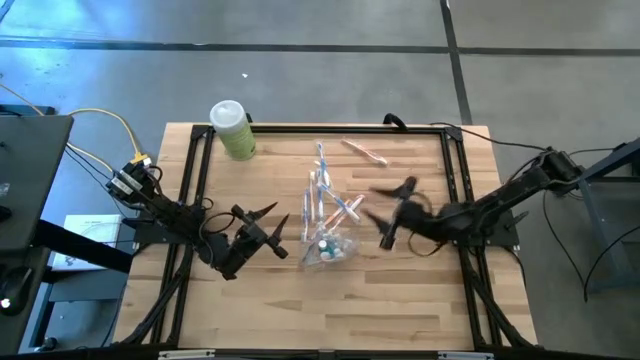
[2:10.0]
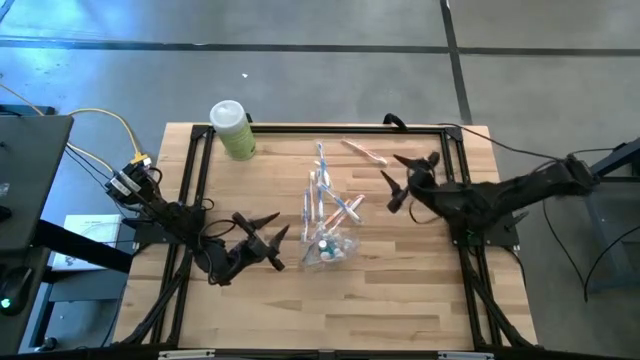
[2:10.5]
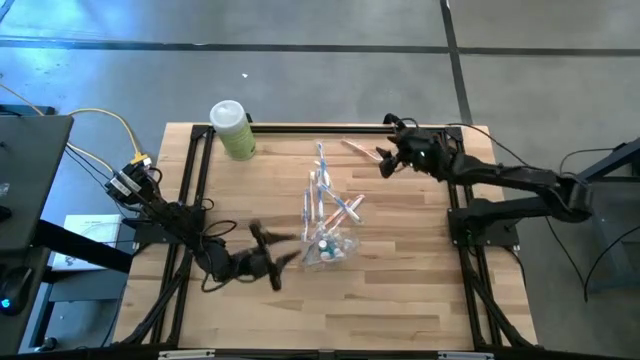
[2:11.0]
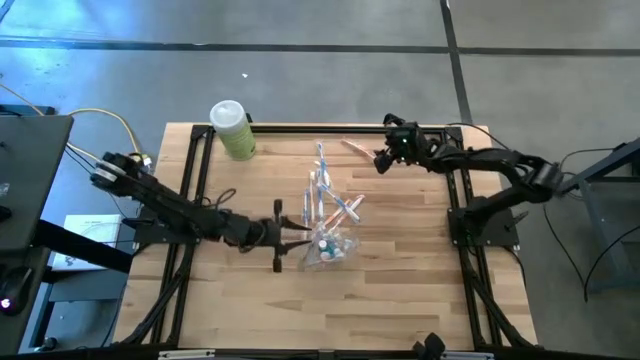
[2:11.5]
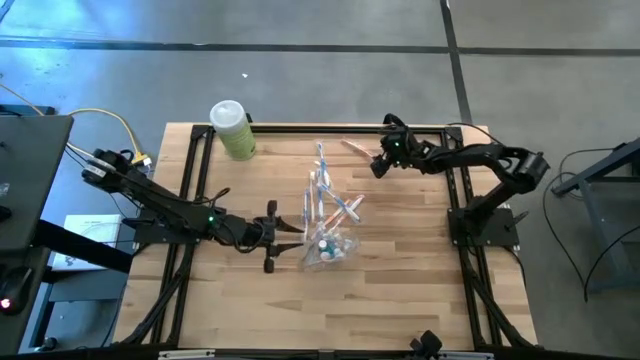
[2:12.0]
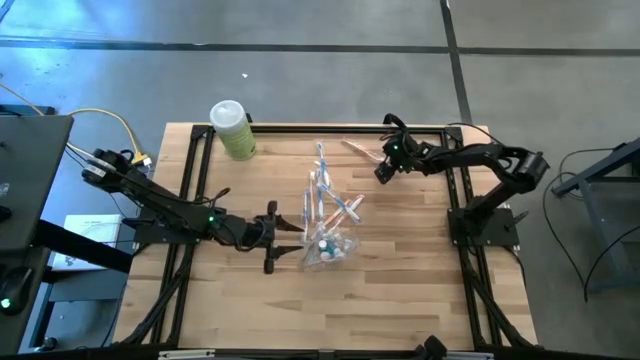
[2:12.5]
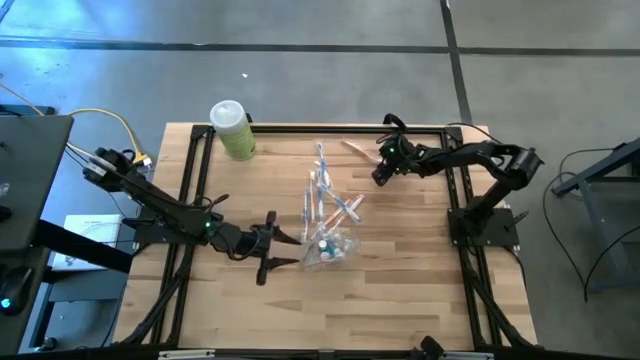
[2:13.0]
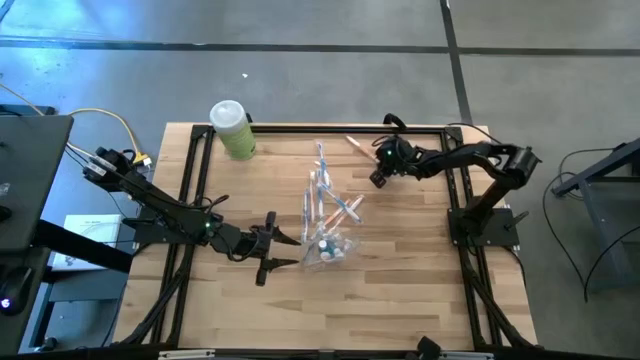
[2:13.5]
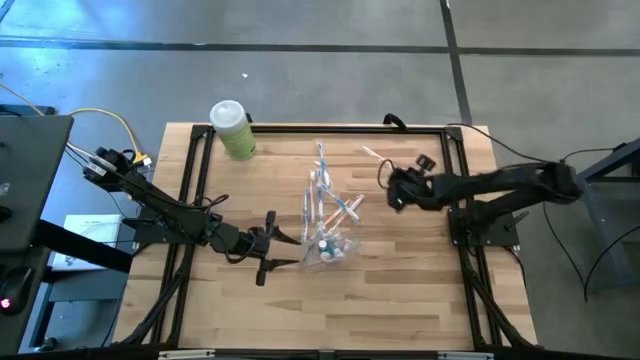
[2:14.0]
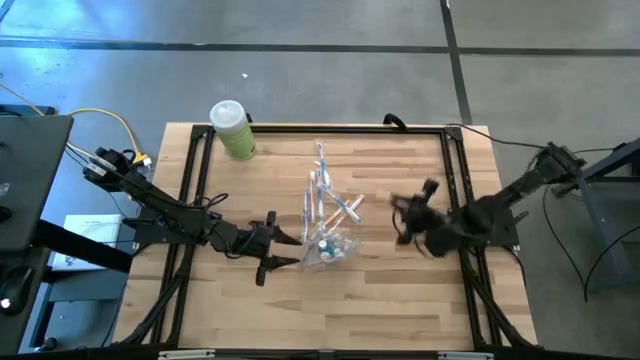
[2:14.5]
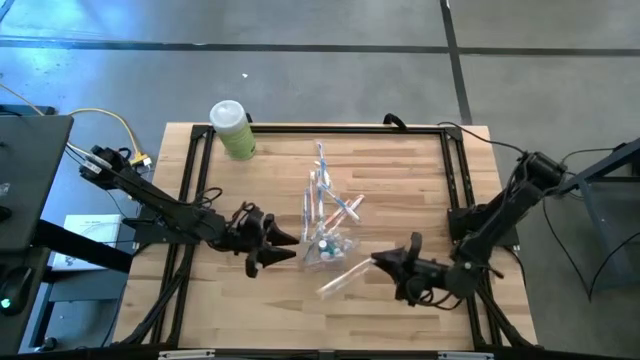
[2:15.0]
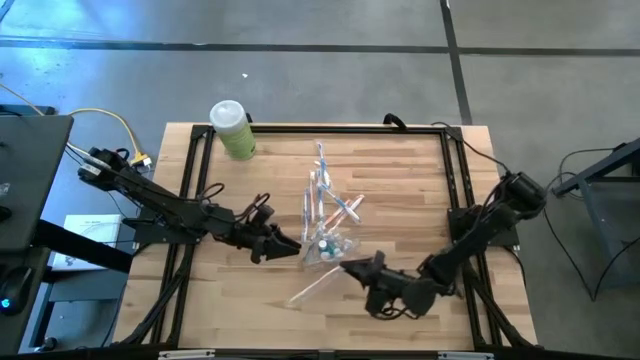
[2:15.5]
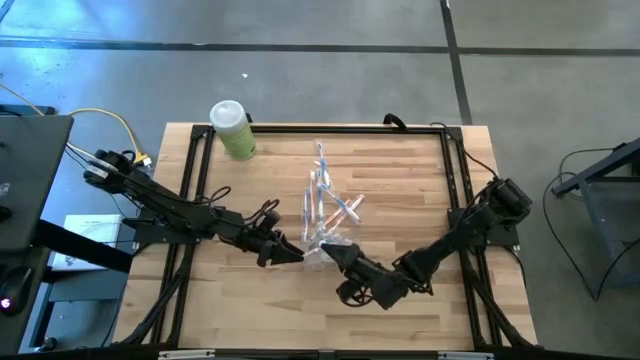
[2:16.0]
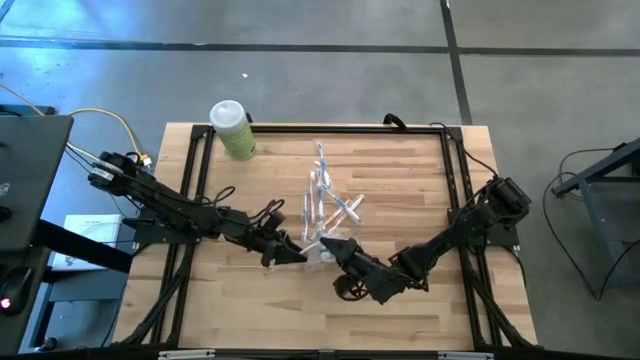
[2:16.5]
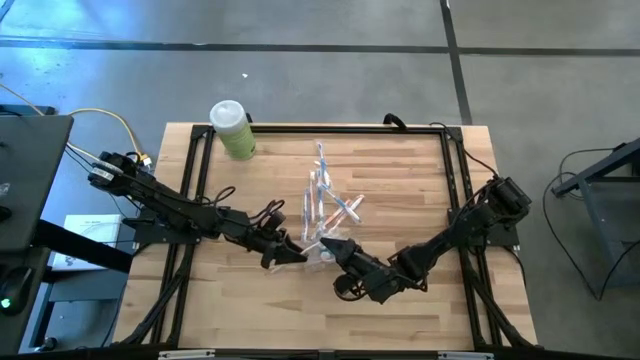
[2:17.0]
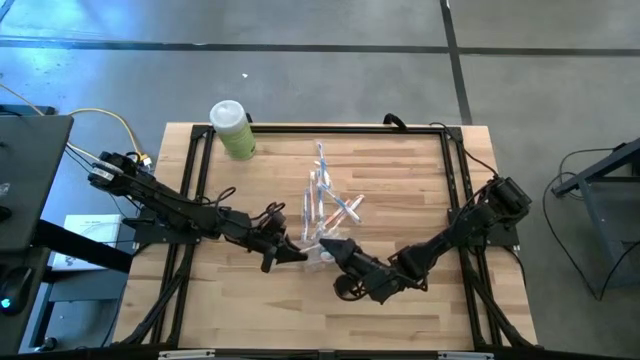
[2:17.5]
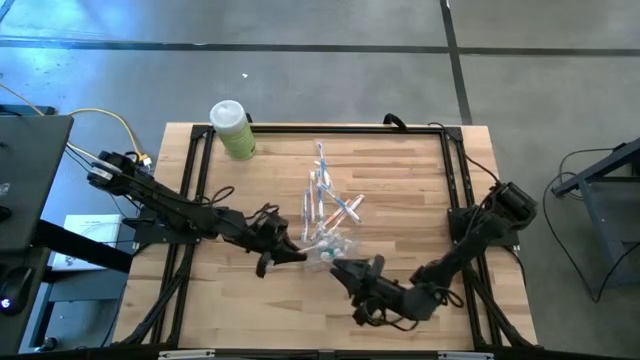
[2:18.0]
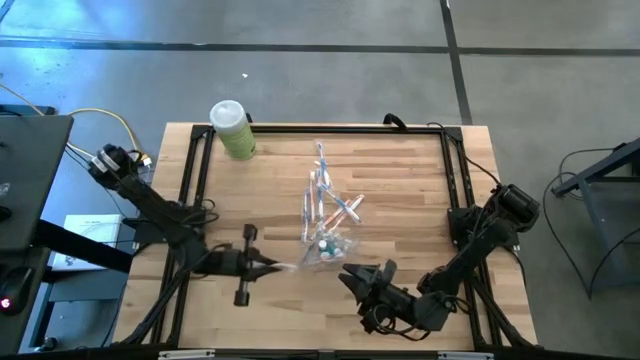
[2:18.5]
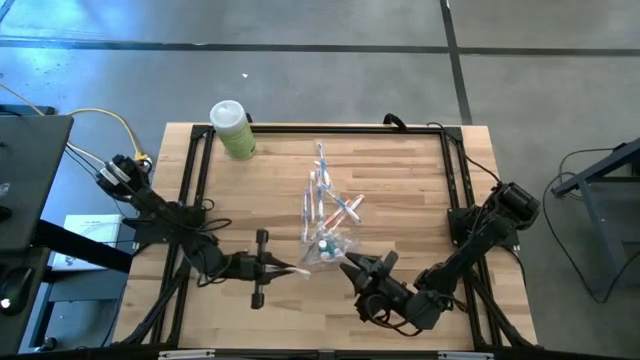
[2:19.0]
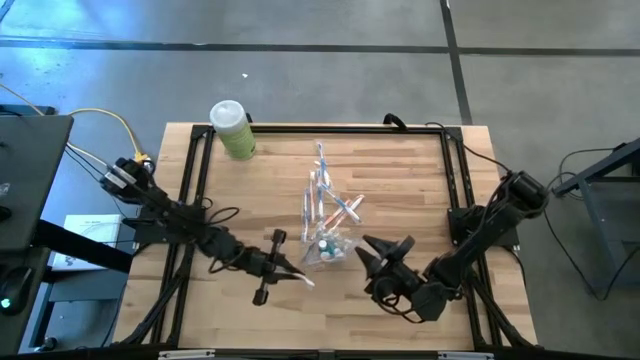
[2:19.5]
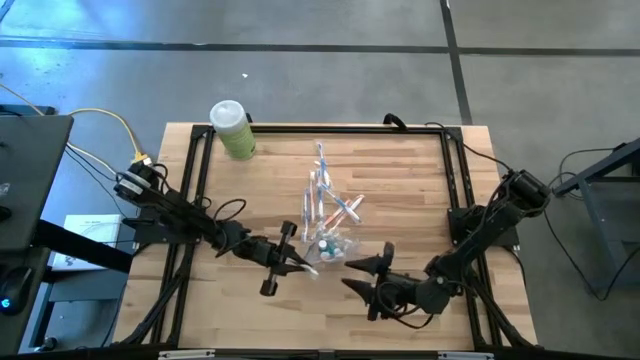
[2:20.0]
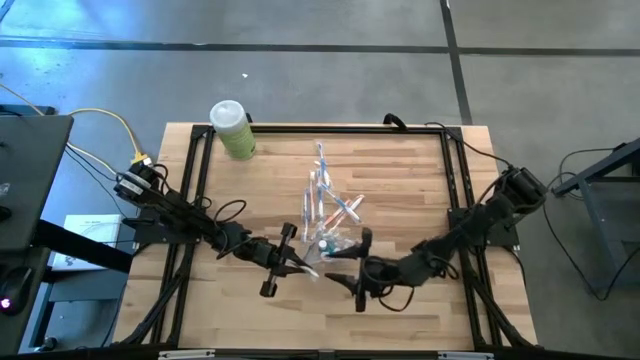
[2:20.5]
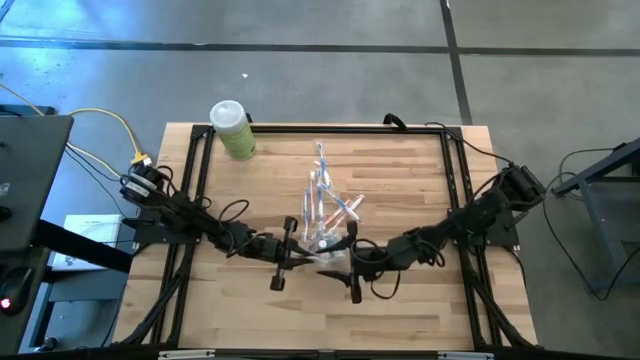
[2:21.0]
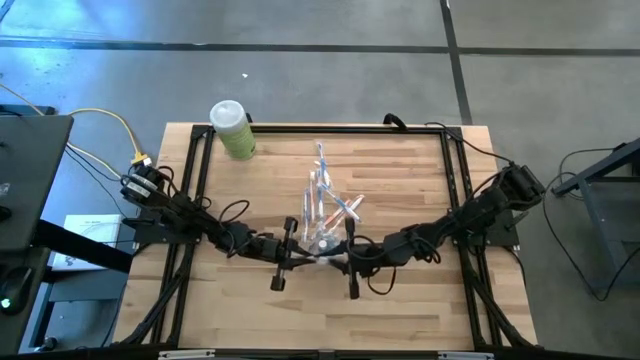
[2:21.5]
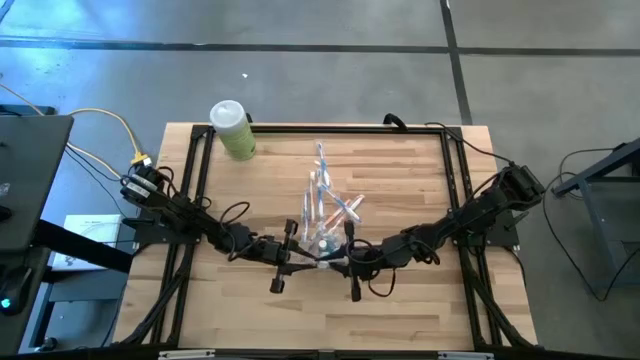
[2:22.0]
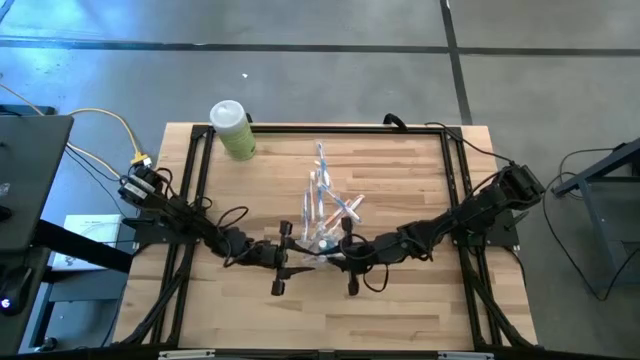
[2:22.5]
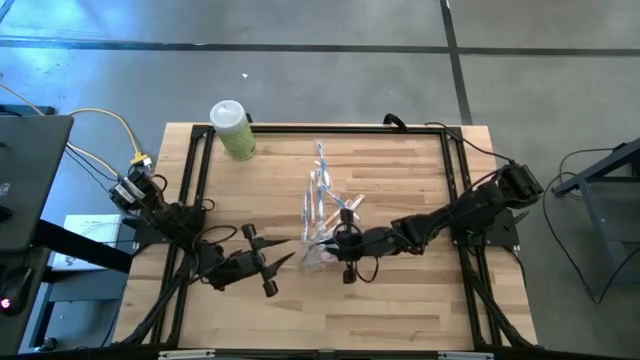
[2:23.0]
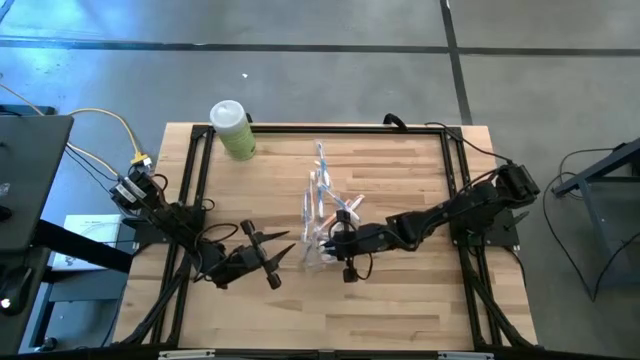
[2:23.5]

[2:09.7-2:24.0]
Task: Pick & Place toothbrushing station
Put the orange toothbrush into the transparent organizer

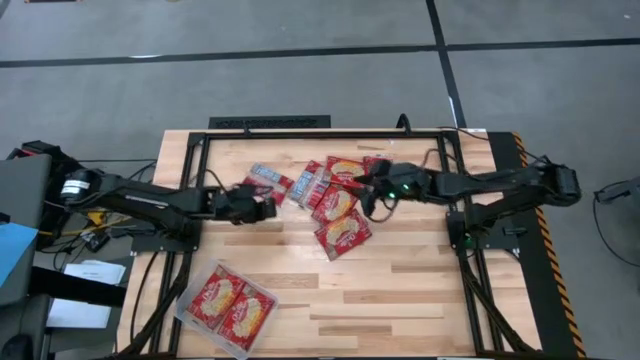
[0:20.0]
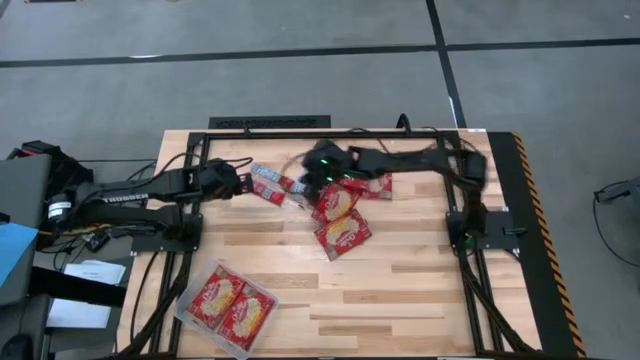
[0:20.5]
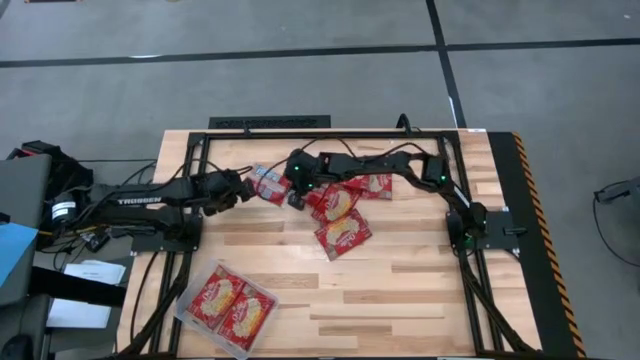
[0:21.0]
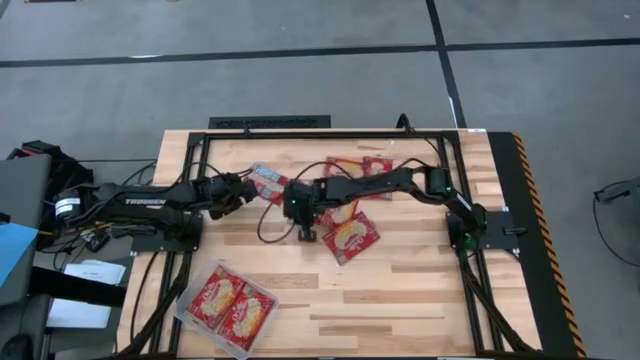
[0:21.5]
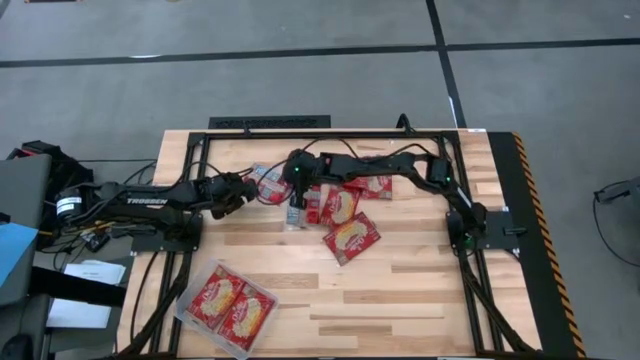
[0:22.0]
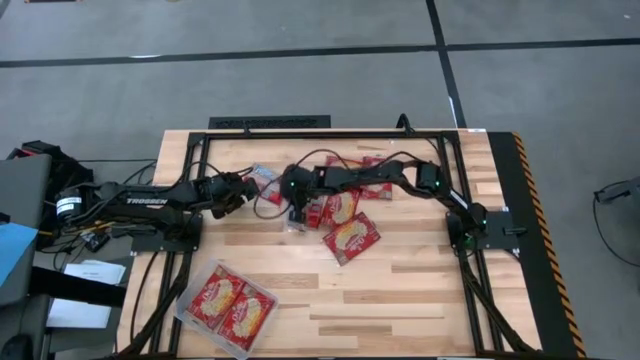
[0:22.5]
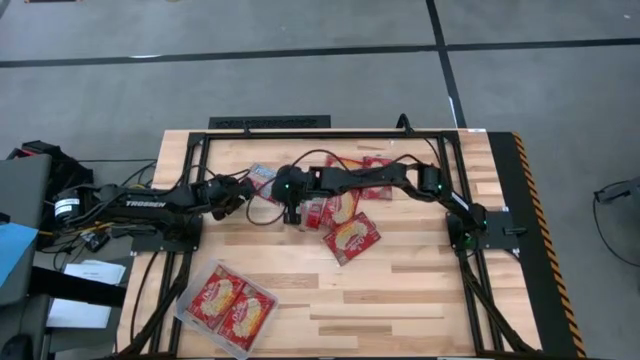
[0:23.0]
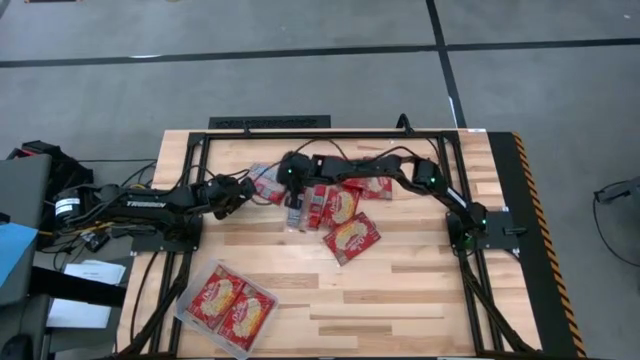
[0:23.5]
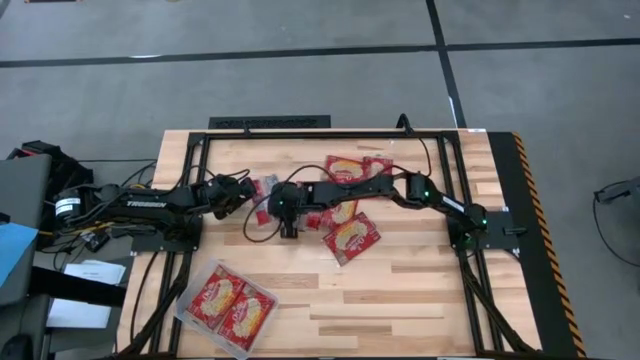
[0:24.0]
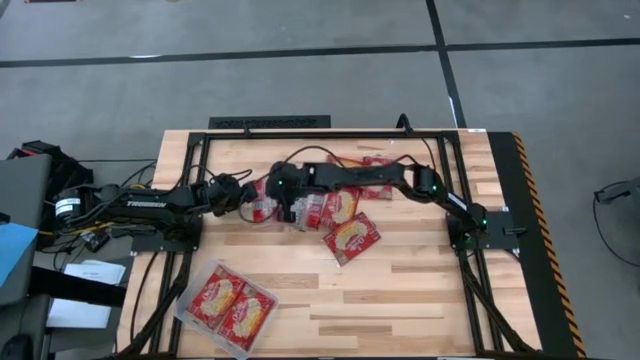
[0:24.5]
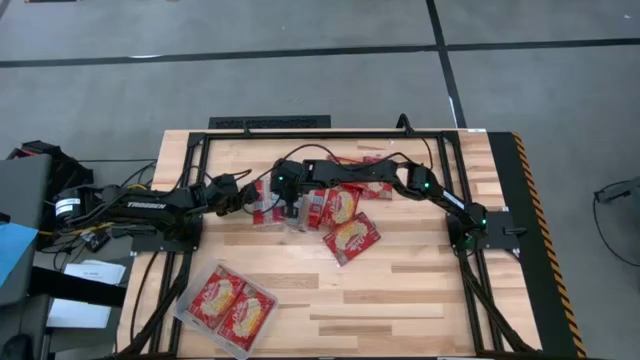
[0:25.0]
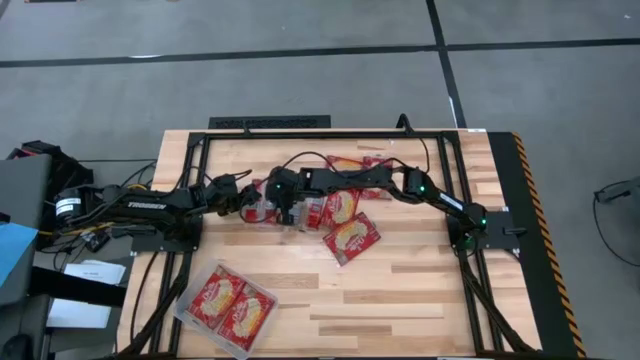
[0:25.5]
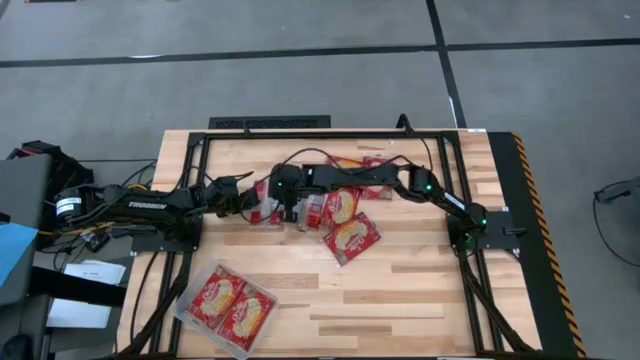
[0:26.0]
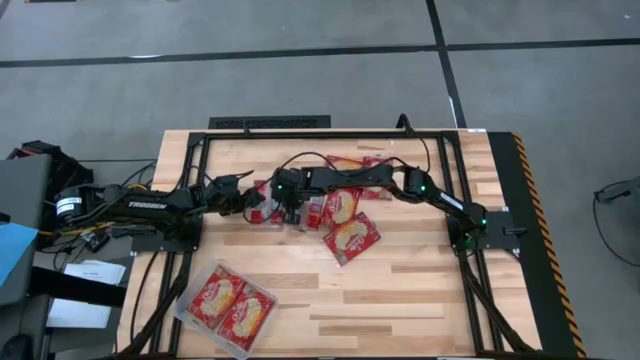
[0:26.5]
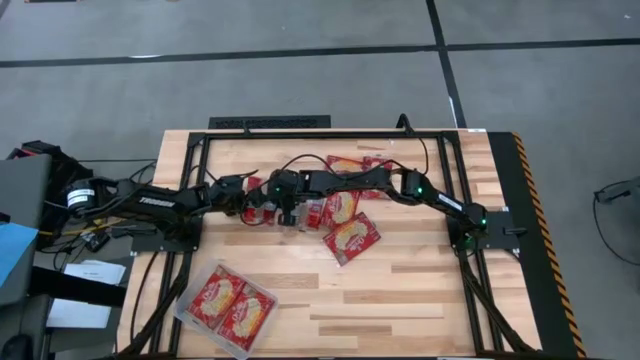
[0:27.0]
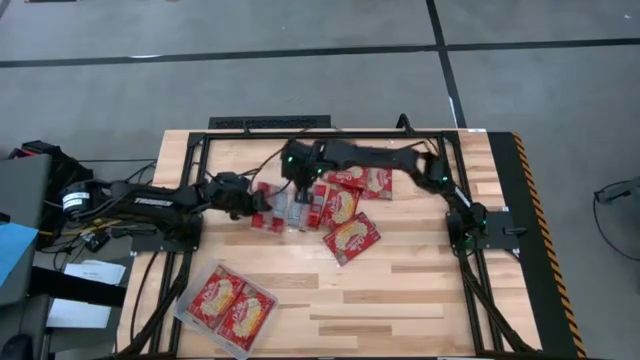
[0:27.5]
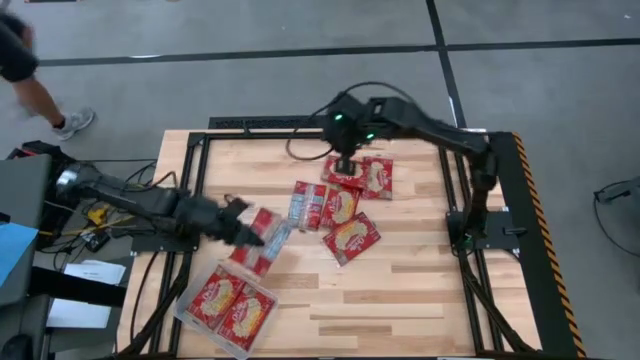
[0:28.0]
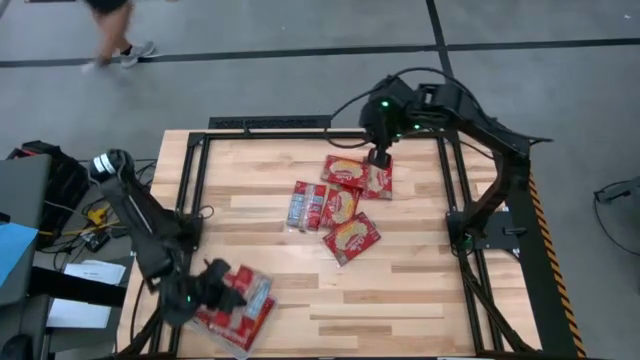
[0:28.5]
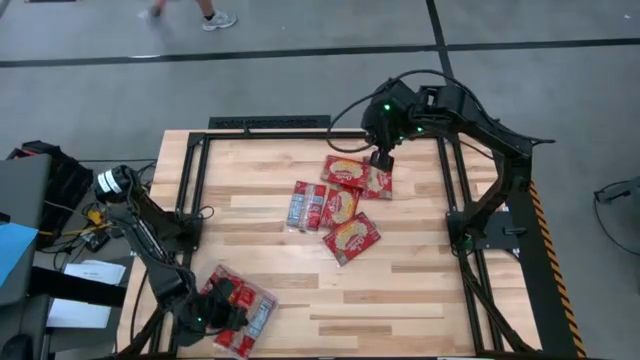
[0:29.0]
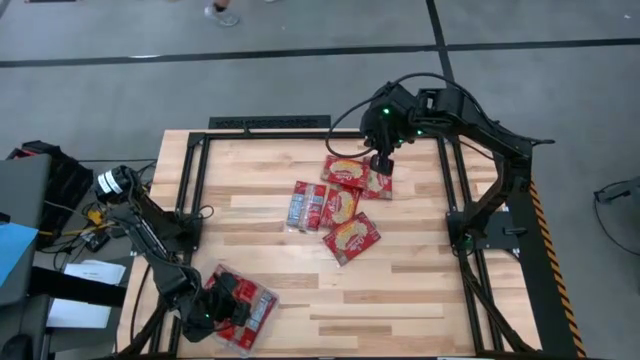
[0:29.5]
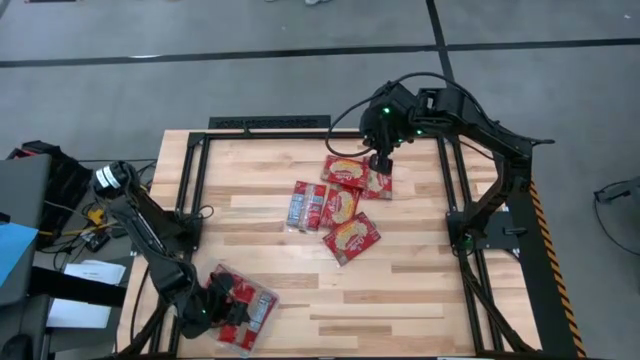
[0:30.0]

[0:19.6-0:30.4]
Task: Sort popcorn bags into baskets
Put the red popcorn bag into the transparent bin
